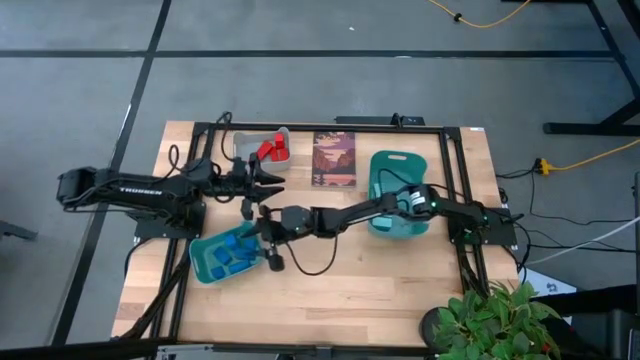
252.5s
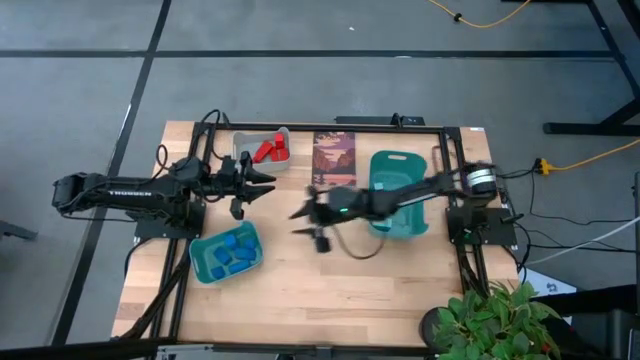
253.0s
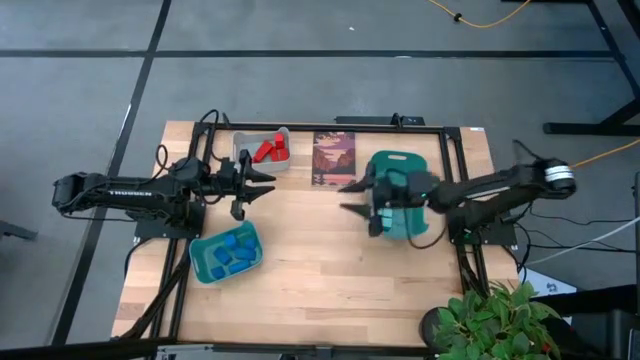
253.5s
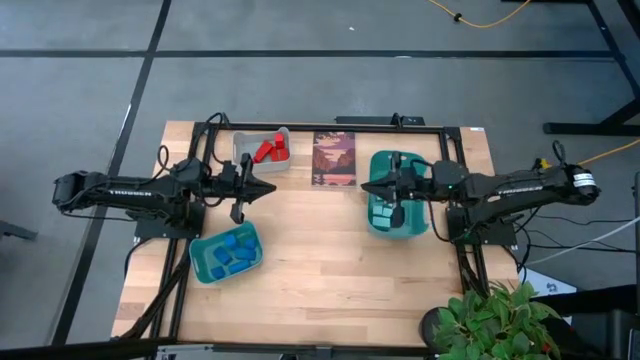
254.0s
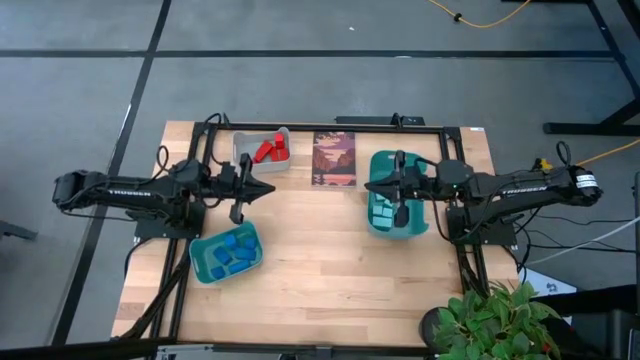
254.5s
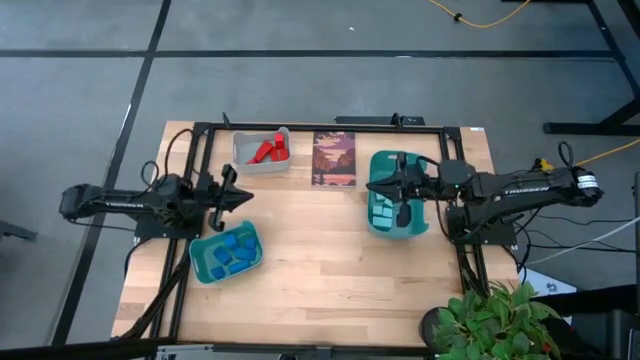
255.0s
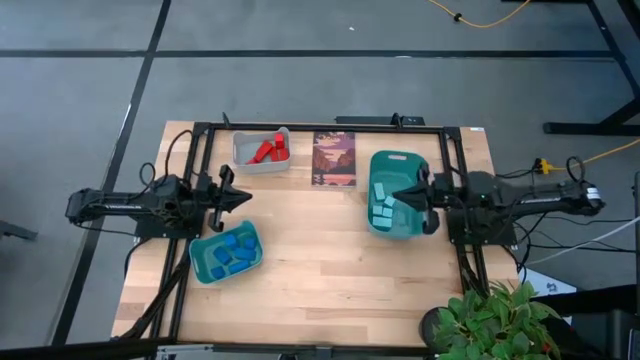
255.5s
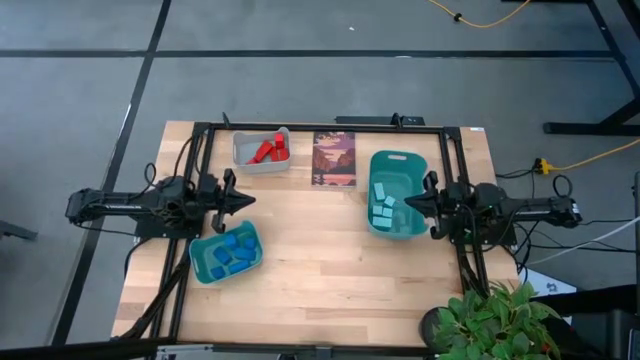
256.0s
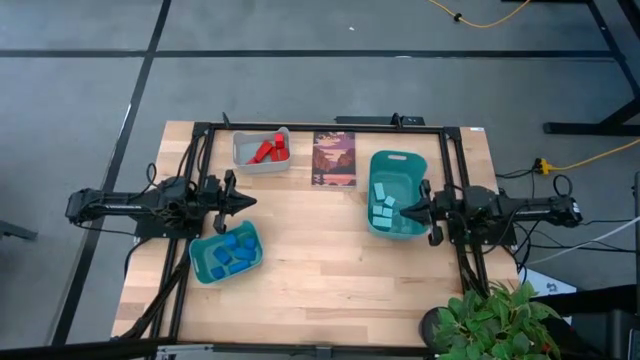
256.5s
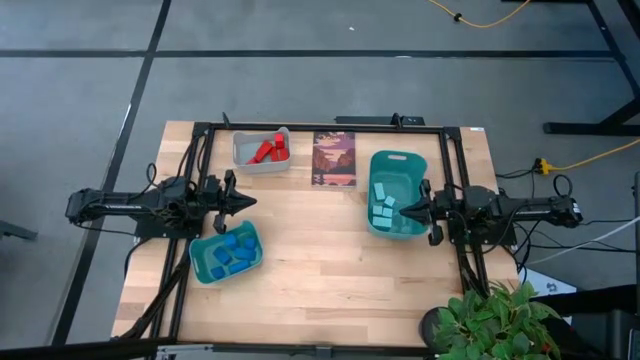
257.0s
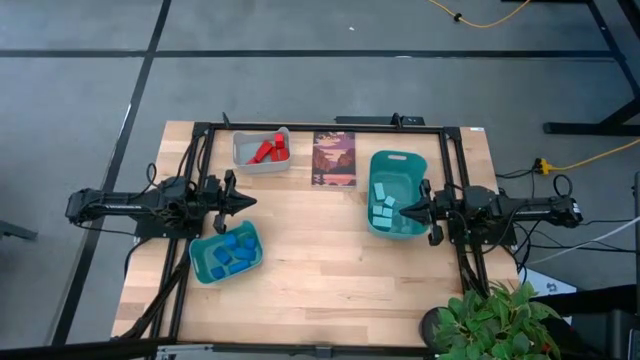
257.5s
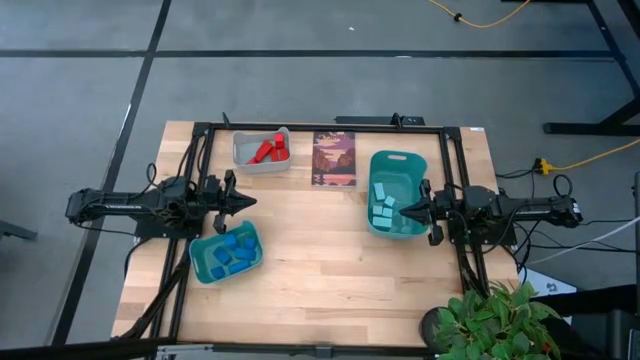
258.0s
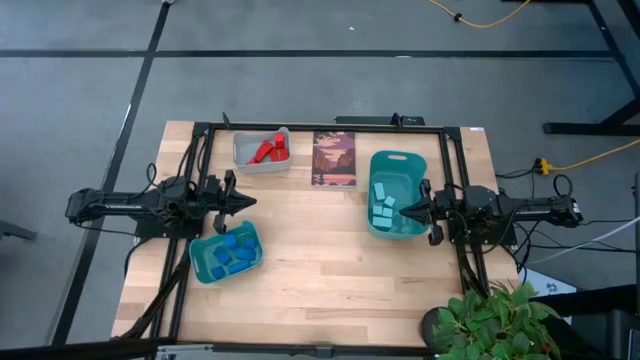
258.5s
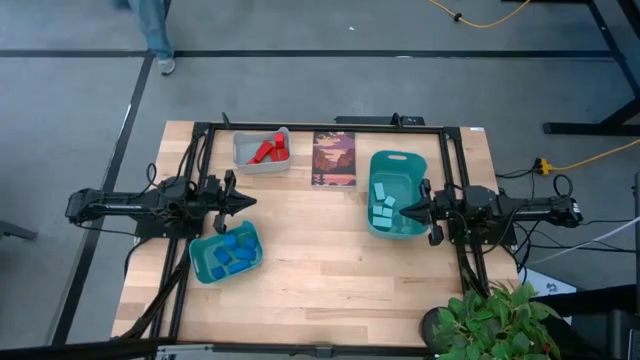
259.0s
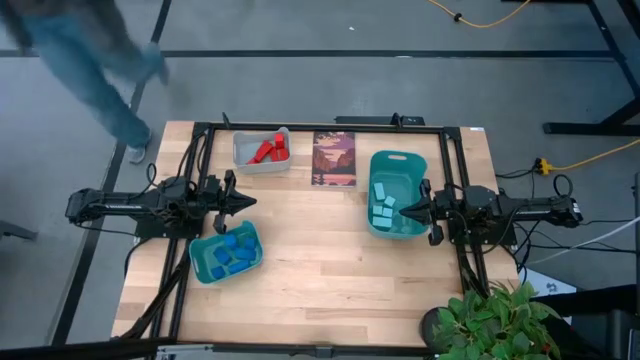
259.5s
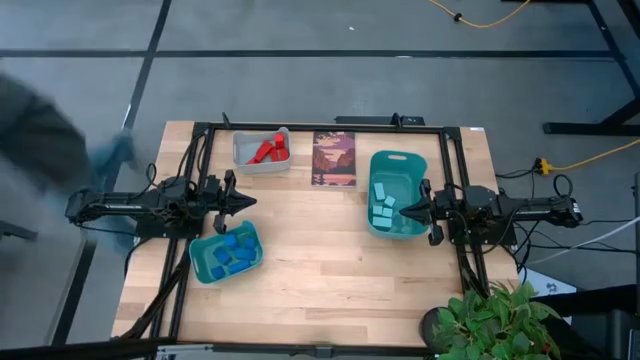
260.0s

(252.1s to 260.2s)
Task: Sort & place blocks by color
Return To Home Position

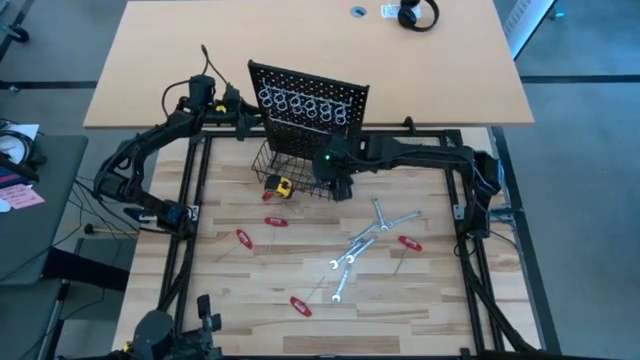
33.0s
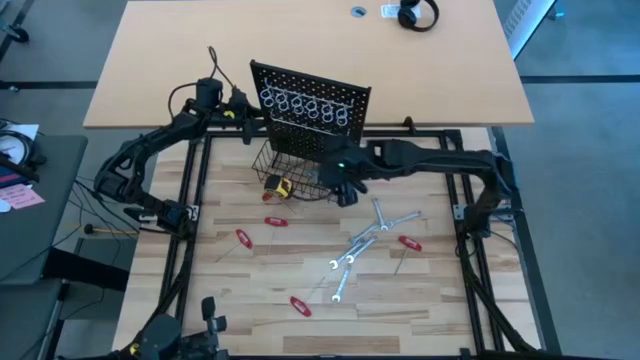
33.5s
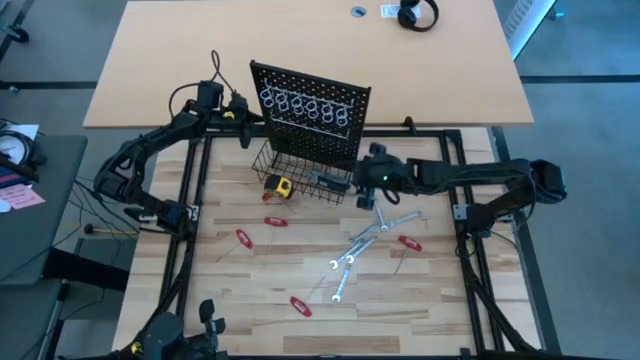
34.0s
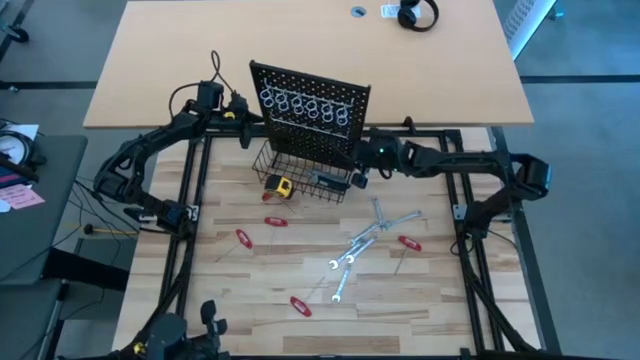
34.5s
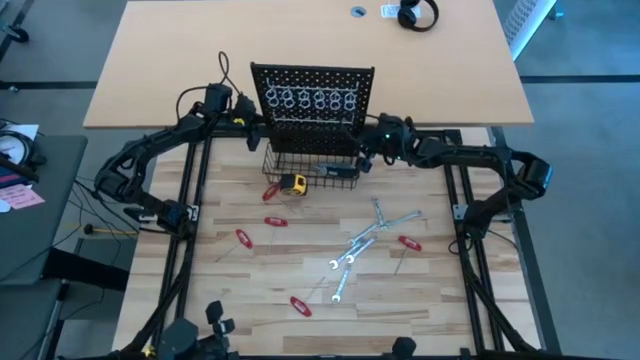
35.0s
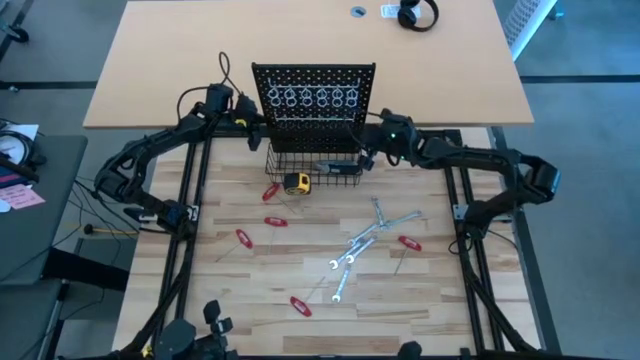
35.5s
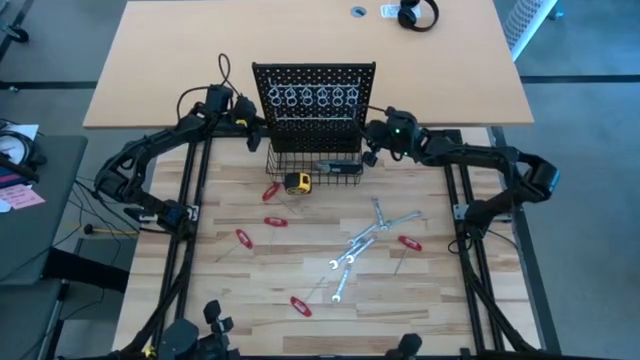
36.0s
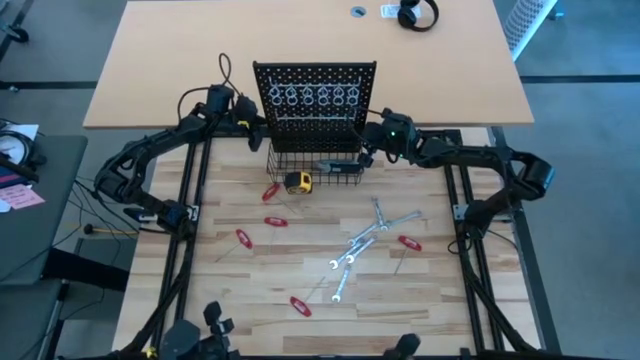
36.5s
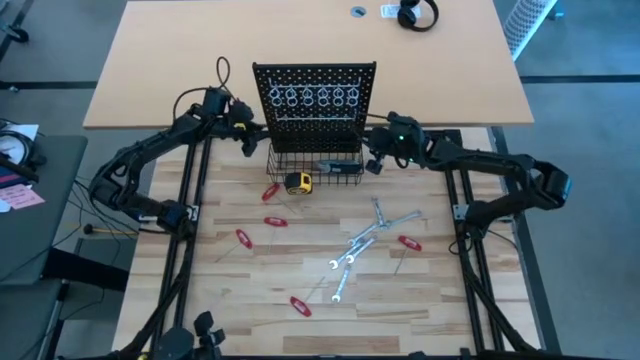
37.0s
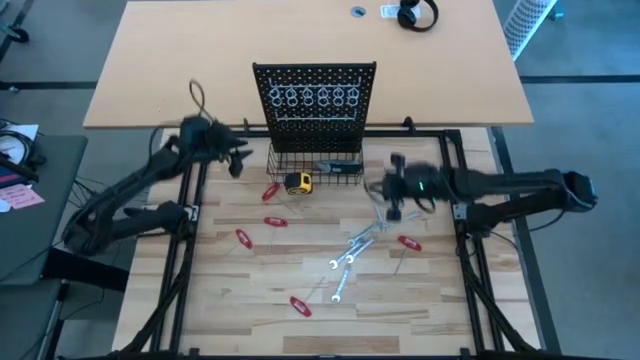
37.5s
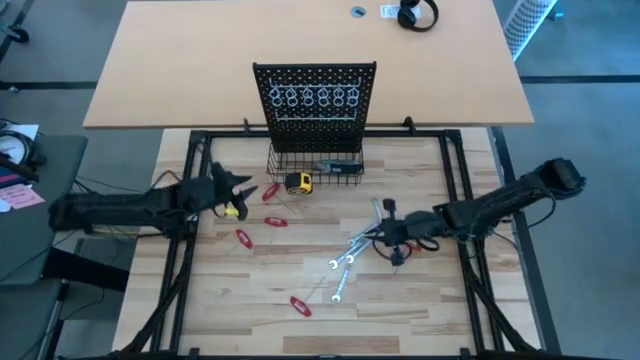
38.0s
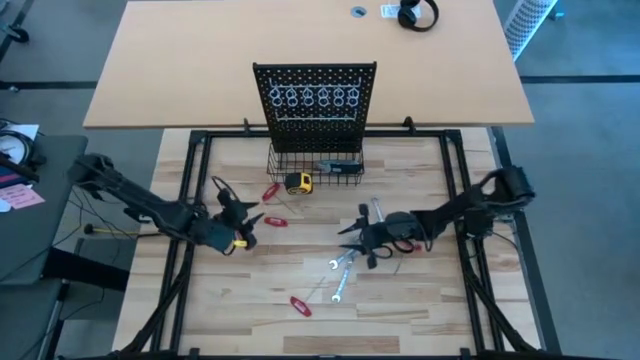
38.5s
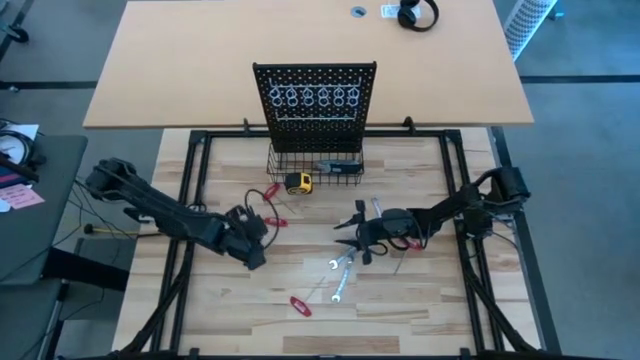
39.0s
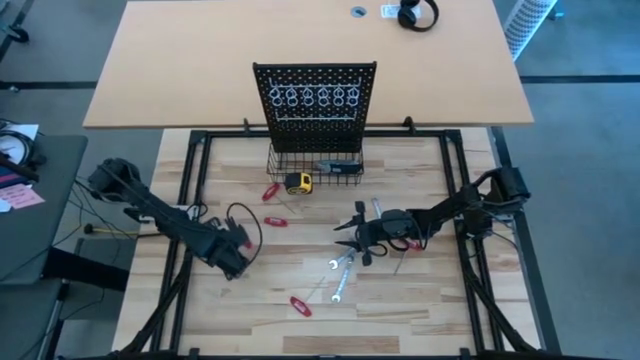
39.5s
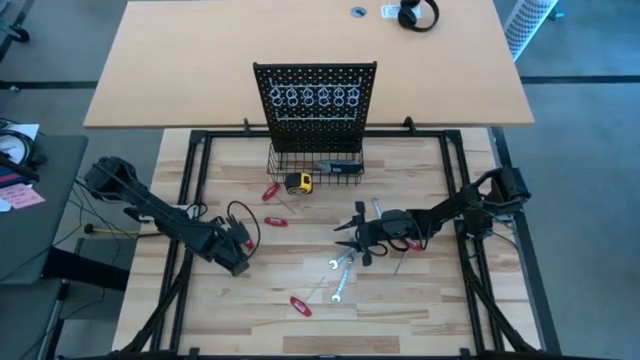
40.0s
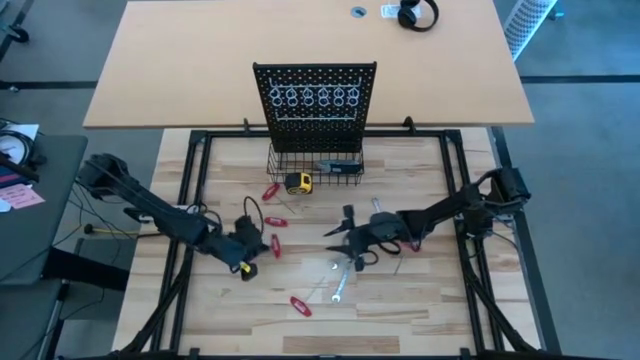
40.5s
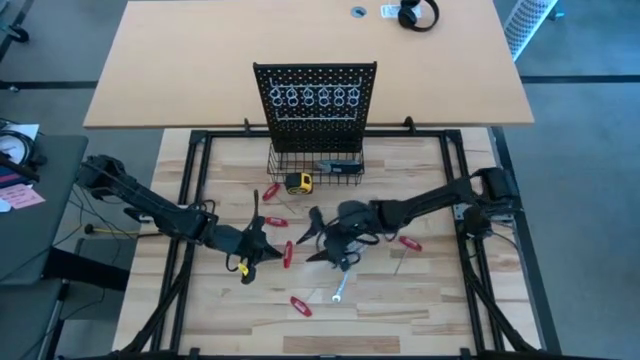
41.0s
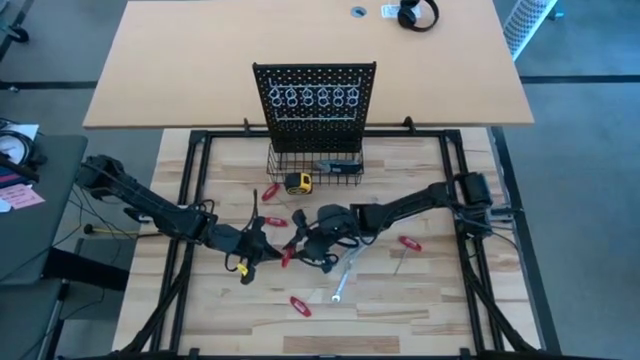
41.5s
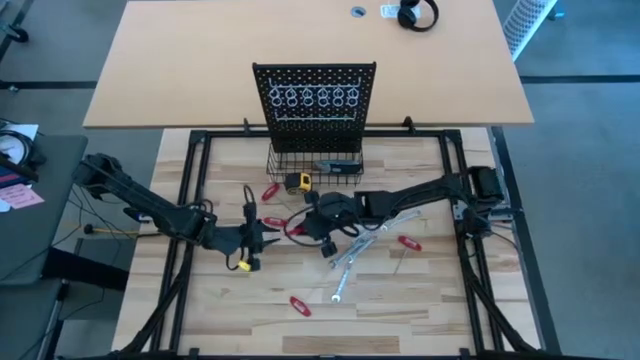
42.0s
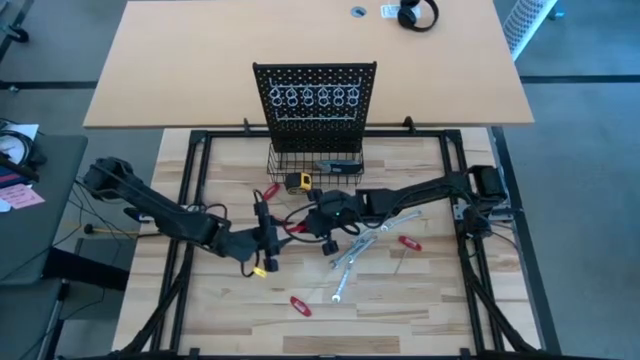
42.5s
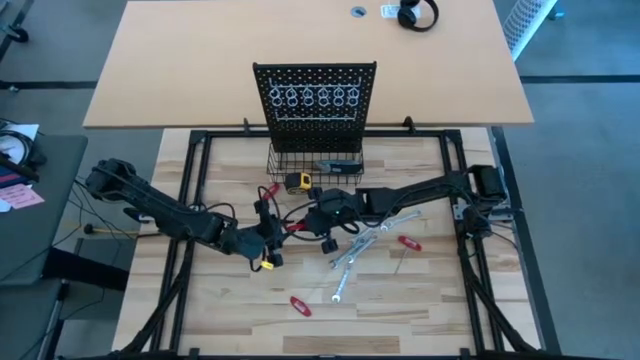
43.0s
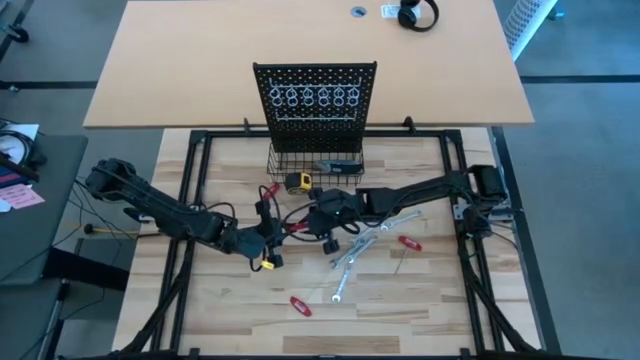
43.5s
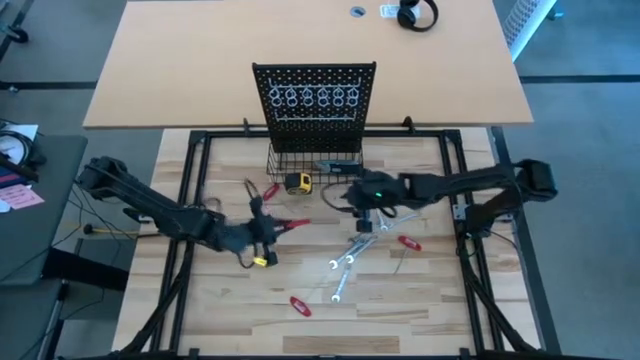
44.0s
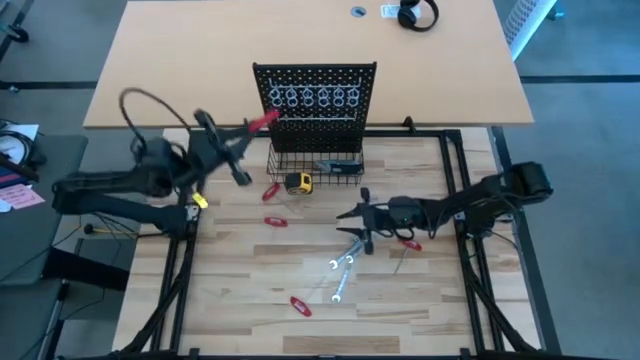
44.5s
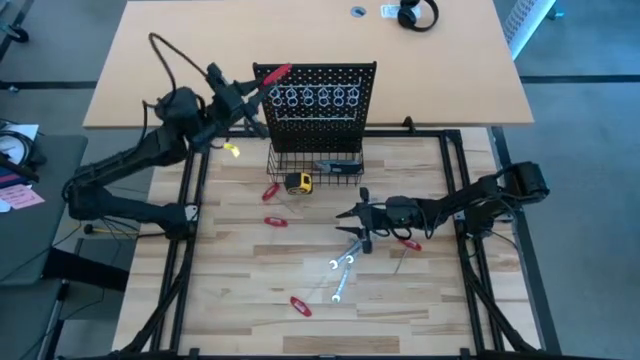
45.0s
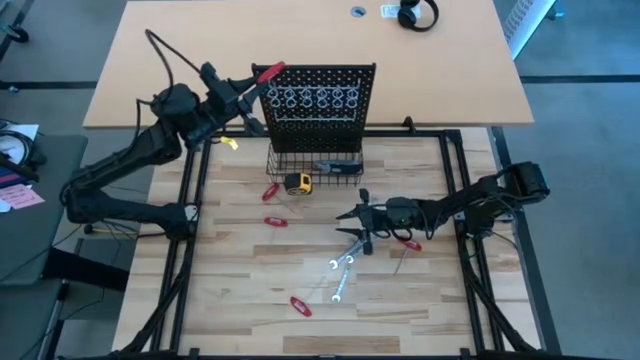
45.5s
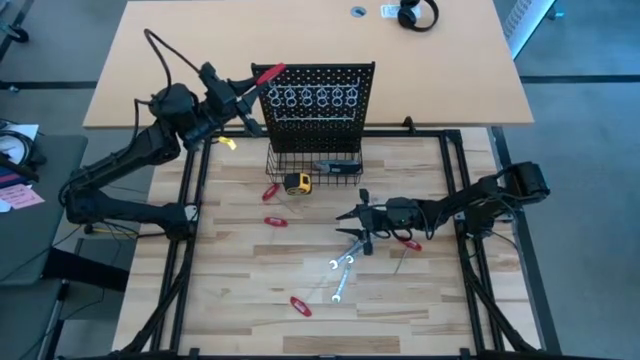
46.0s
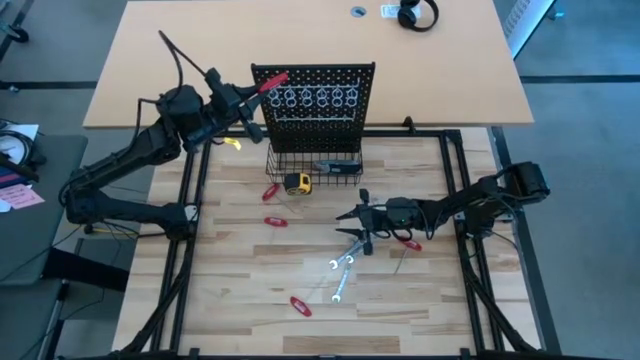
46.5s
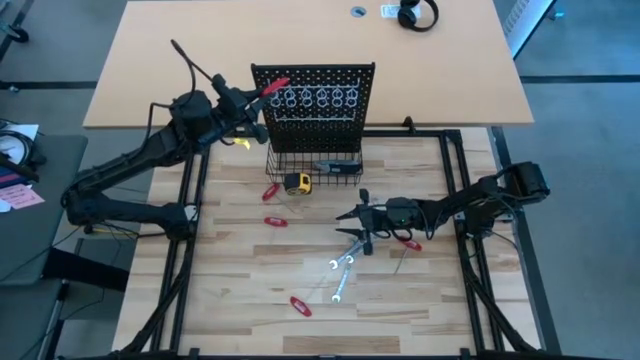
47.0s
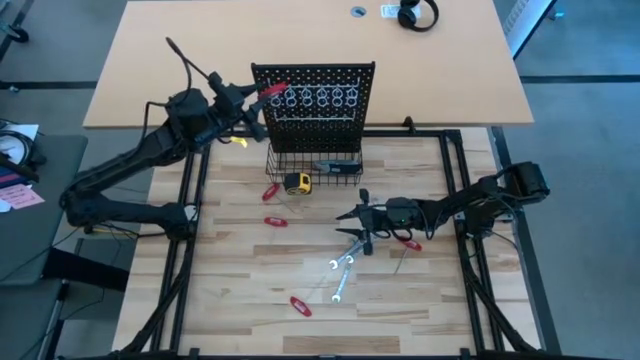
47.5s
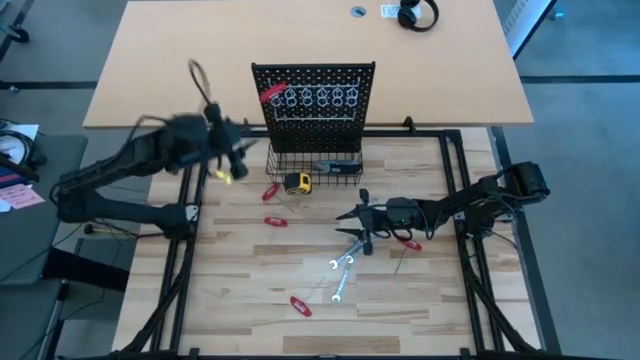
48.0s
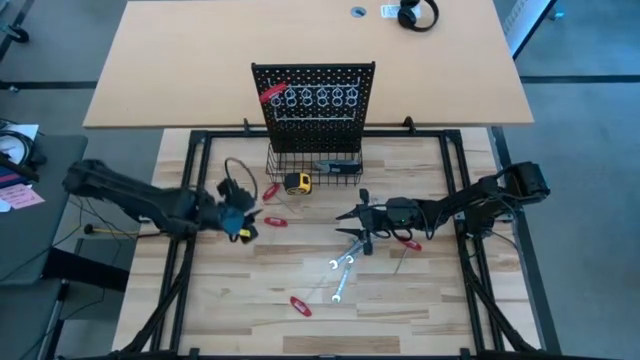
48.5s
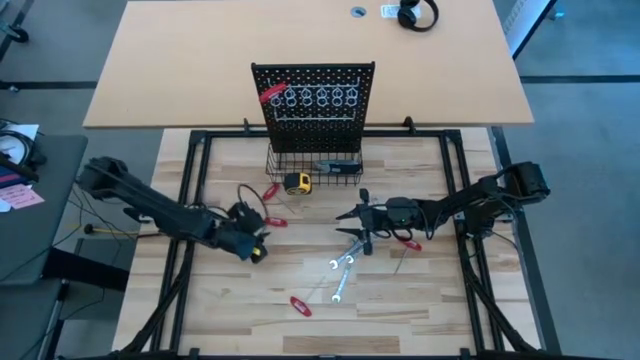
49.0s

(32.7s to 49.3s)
Task: Hang tools onto peg board
Hang the red T-handle Allen wrench into the pegboard
